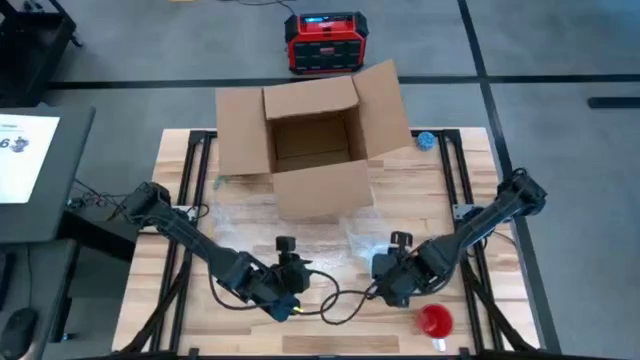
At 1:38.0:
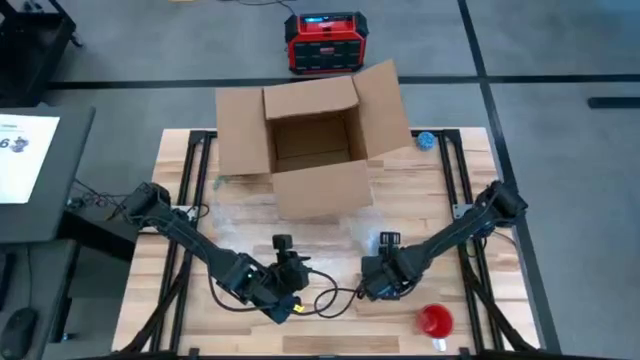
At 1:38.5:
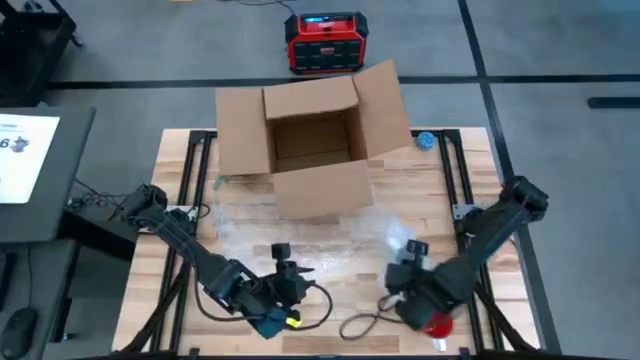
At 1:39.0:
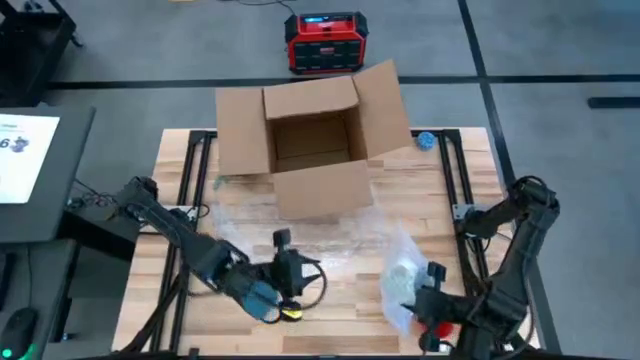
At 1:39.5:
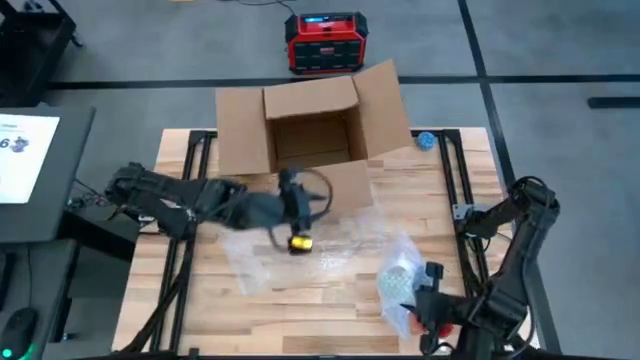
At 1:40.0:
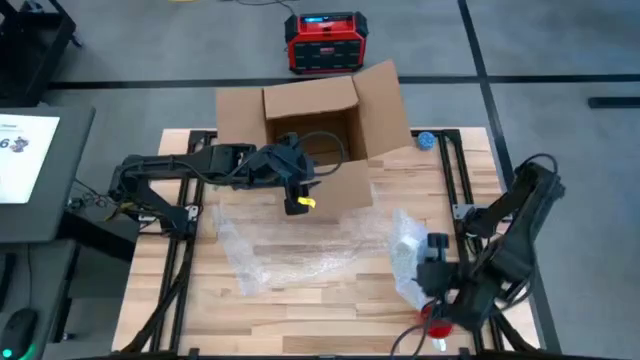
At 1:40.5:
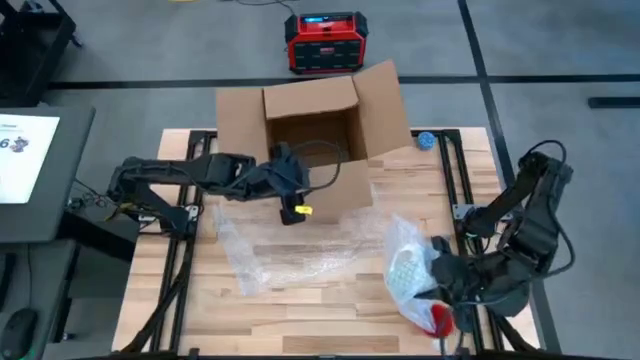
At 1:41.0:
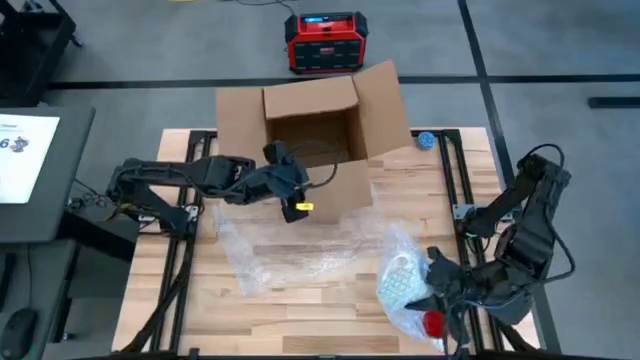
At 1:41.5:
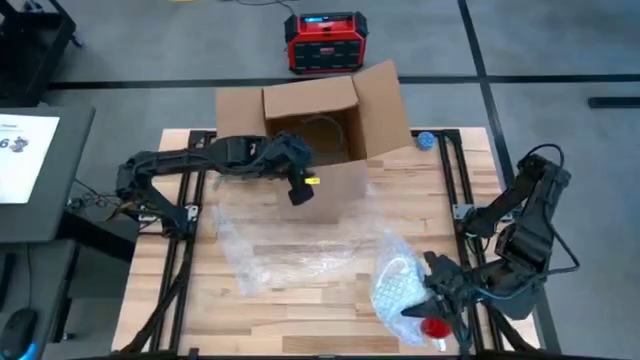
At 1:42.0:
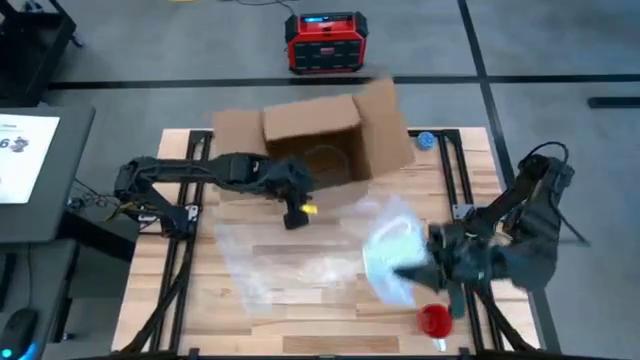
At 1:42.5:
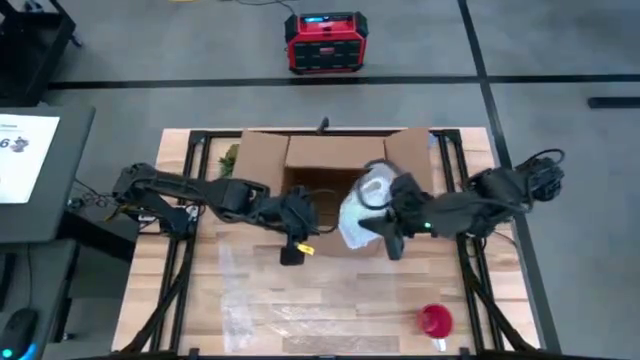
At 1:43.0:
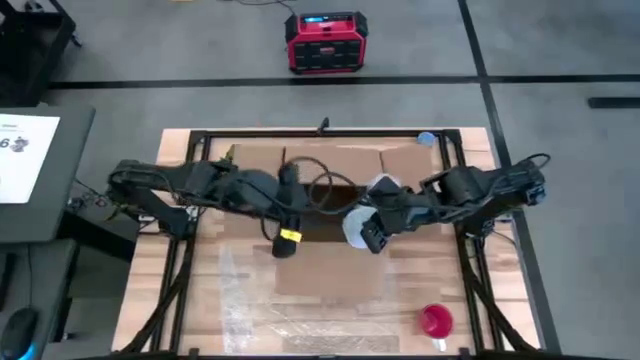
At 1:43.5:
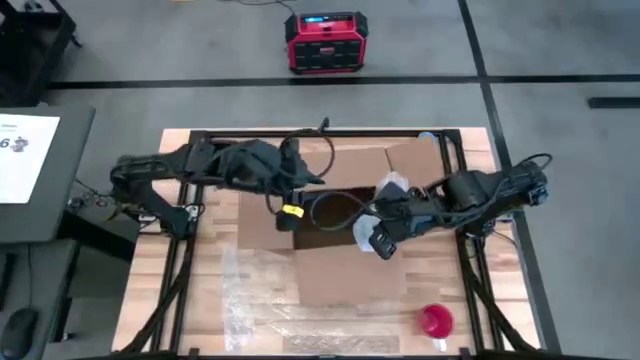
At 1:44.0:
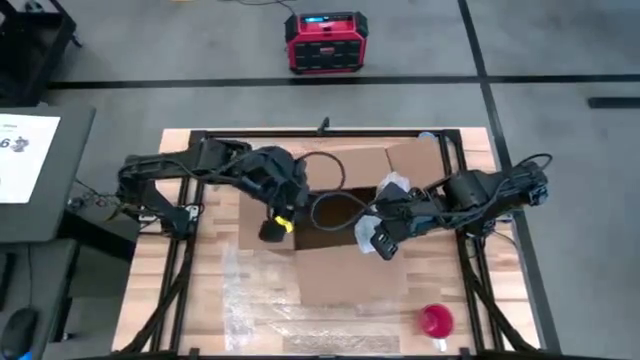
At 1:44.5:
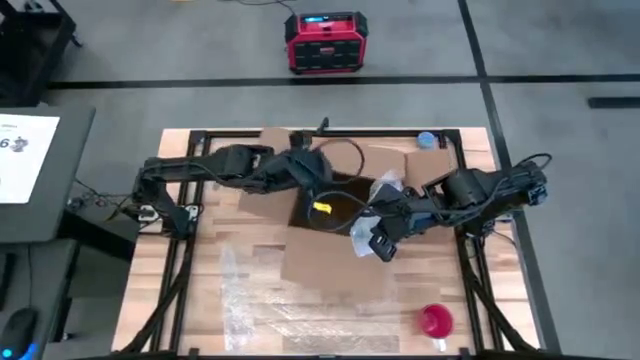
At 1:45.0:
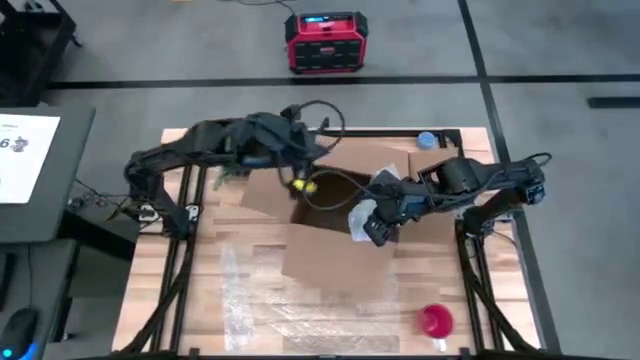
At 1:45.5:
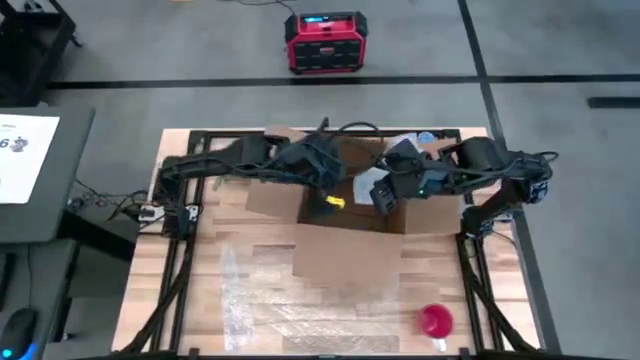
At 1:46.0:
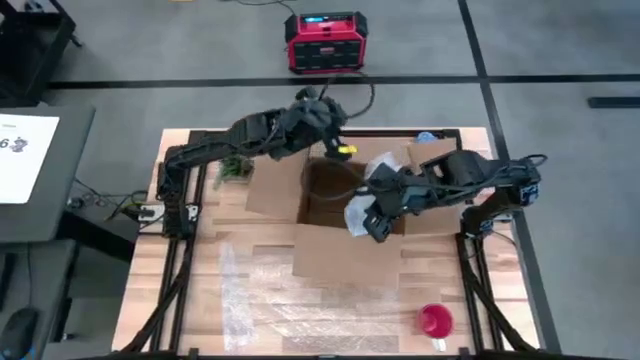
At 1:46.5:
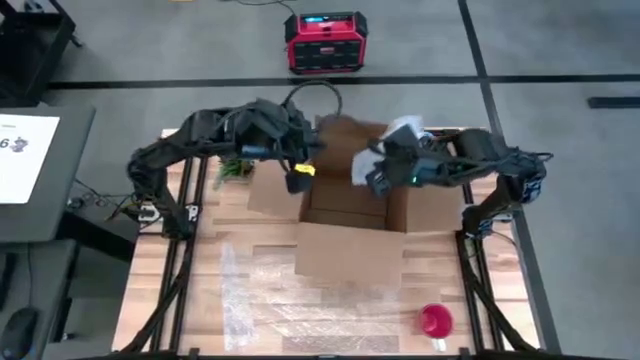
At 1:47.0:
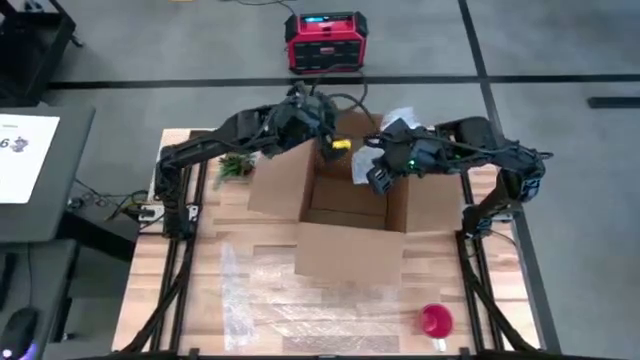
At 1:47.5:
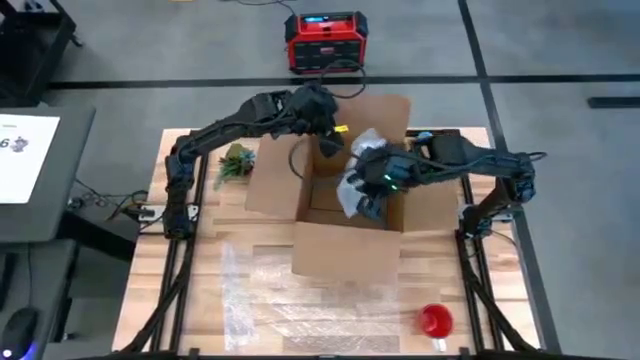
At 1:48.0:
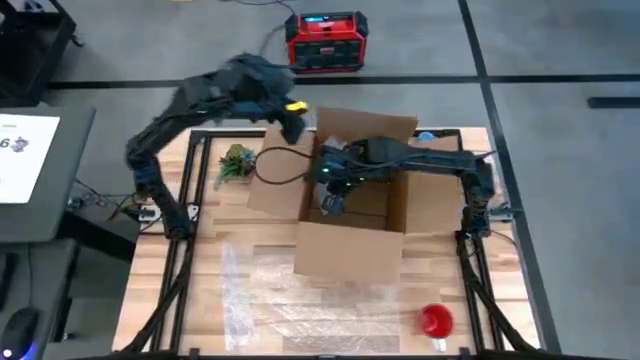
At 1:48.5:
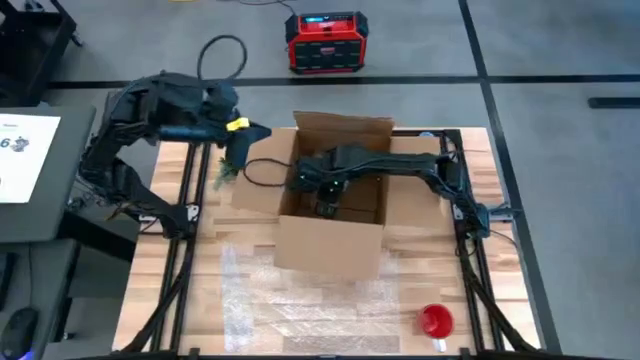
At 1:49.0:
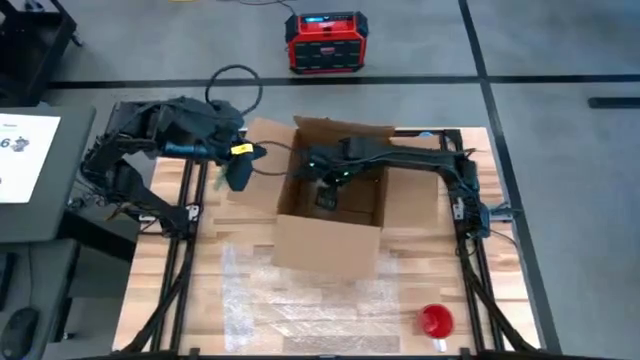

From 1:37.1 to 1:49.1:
Task: wrap mug
Put the green patterned mug into the cardboard box

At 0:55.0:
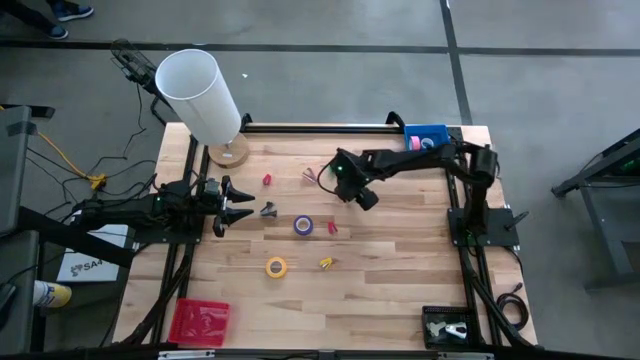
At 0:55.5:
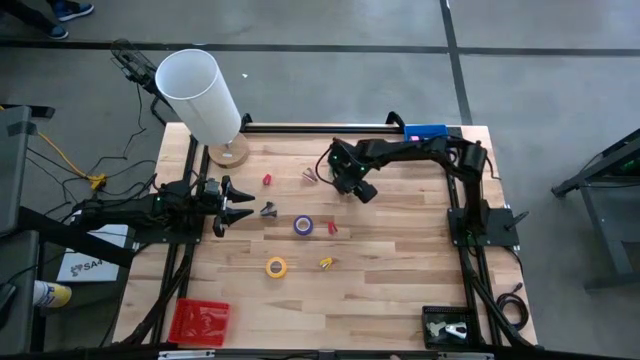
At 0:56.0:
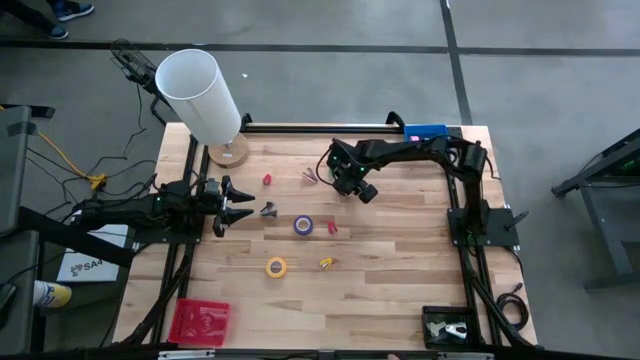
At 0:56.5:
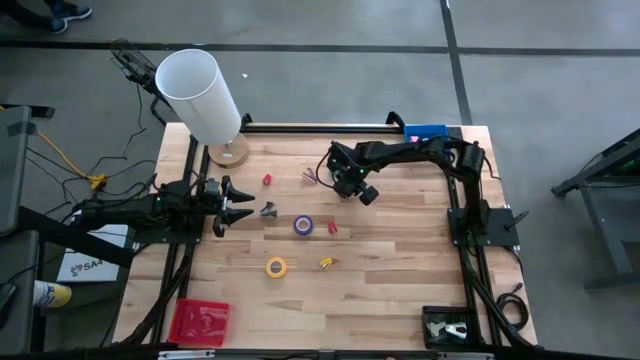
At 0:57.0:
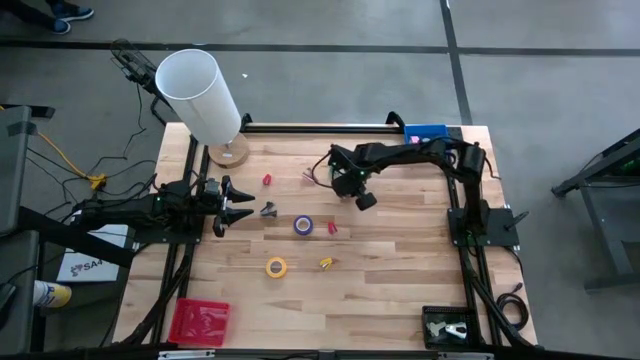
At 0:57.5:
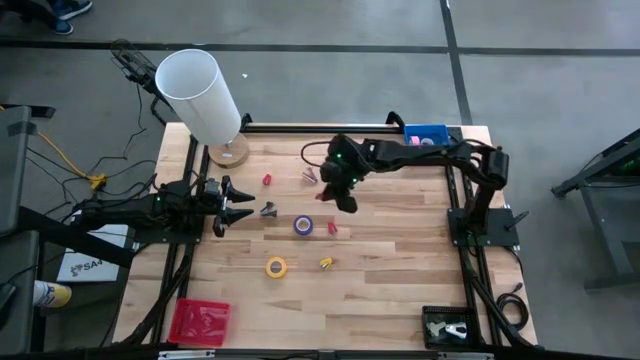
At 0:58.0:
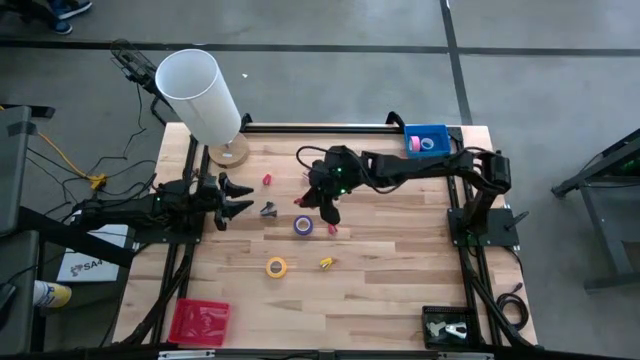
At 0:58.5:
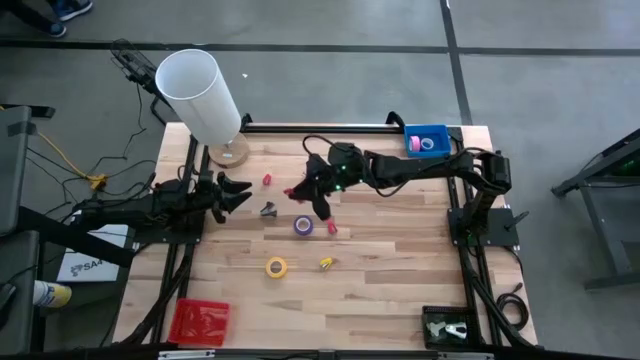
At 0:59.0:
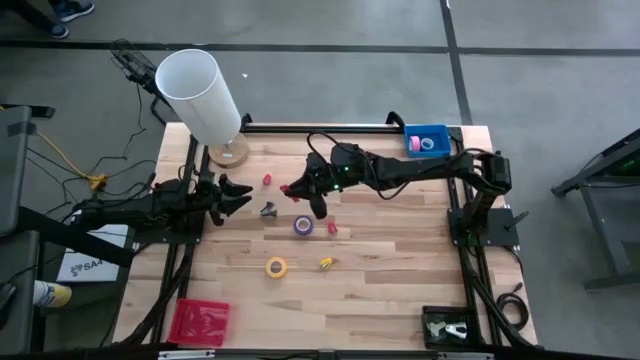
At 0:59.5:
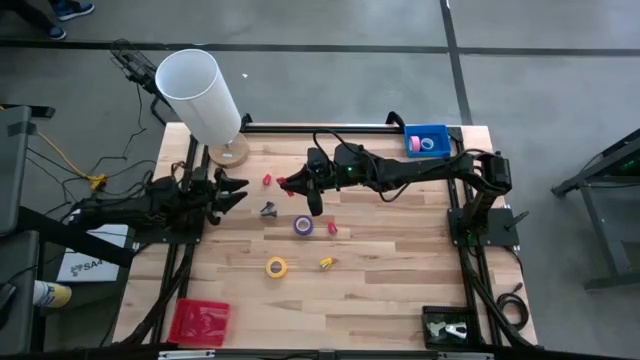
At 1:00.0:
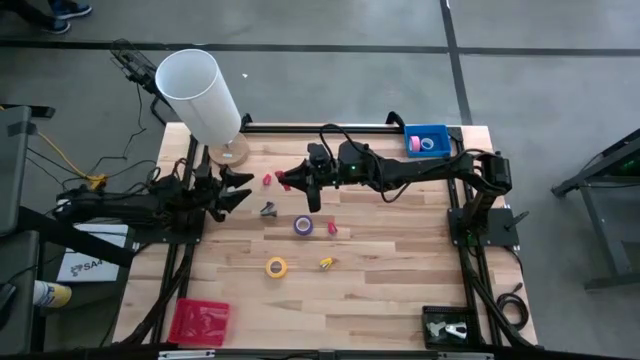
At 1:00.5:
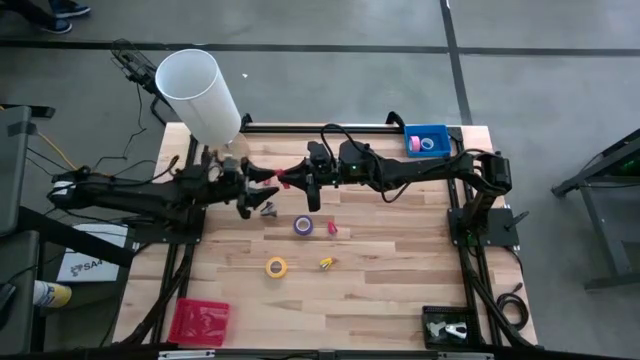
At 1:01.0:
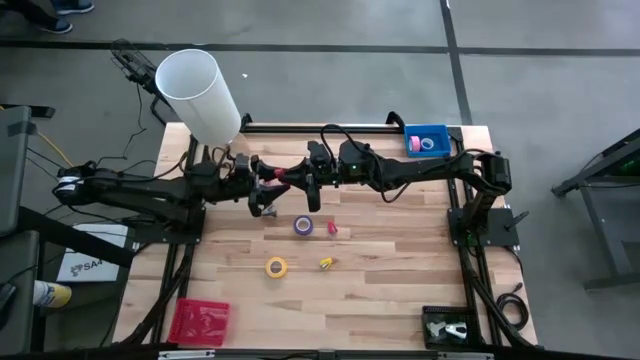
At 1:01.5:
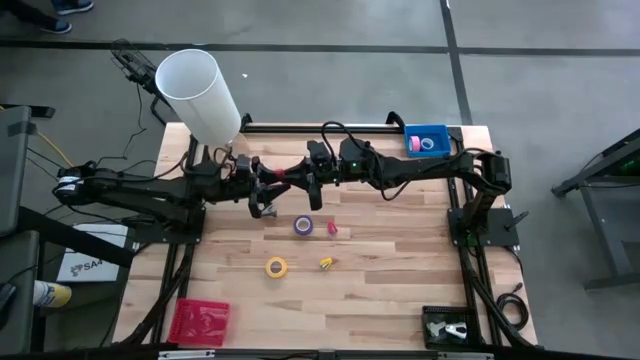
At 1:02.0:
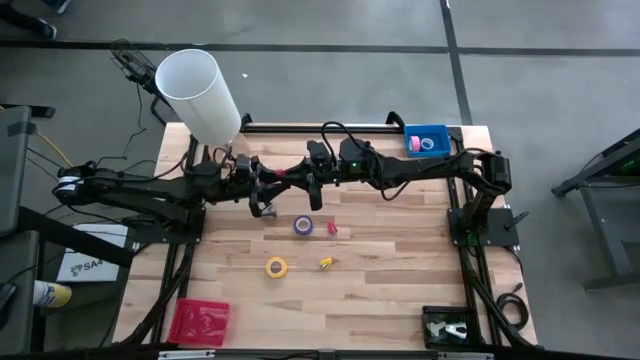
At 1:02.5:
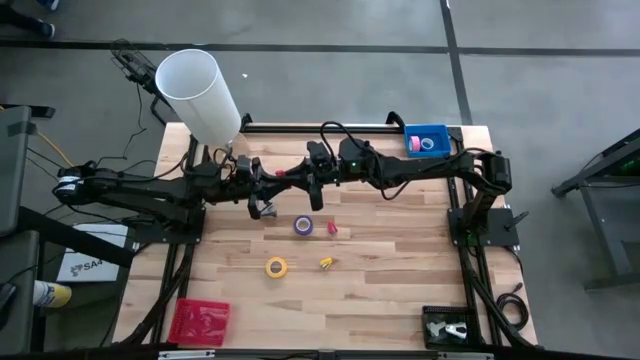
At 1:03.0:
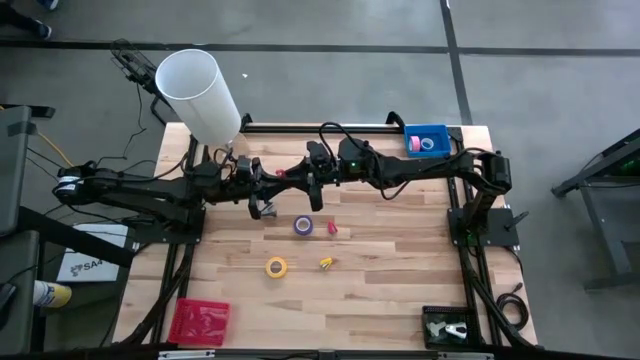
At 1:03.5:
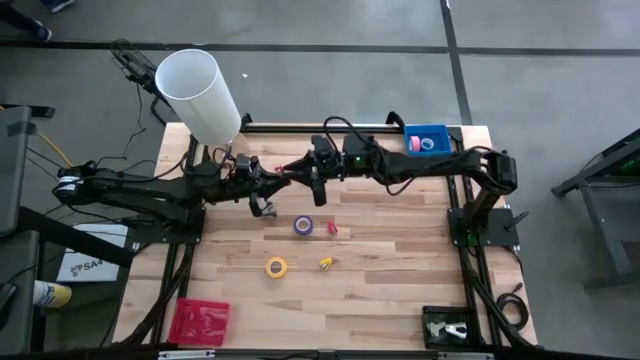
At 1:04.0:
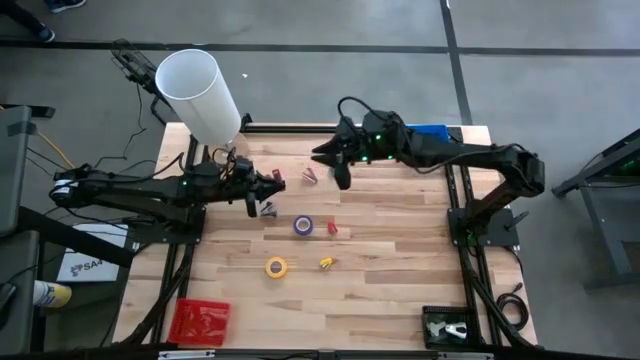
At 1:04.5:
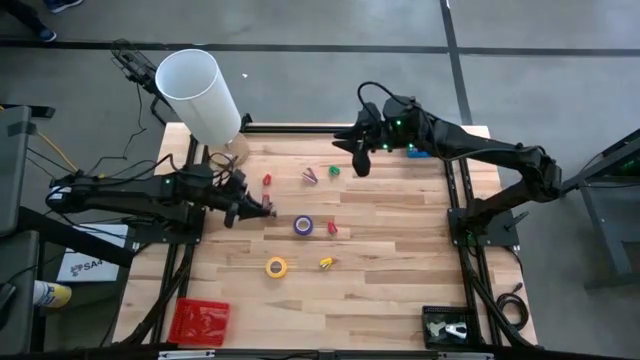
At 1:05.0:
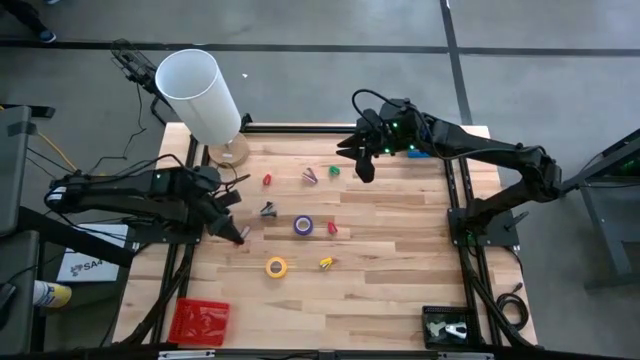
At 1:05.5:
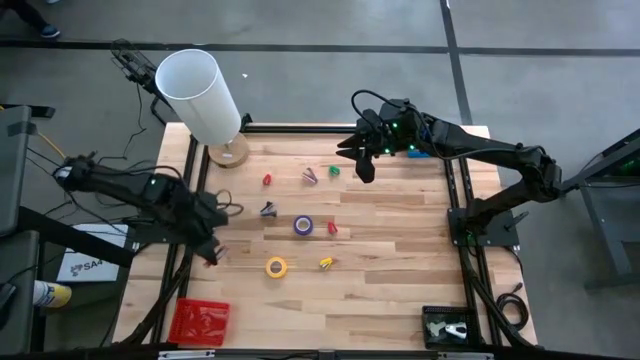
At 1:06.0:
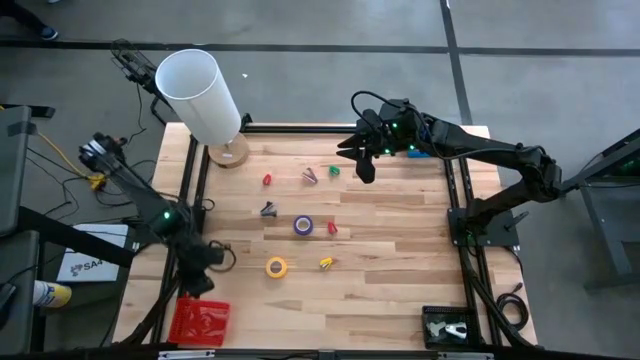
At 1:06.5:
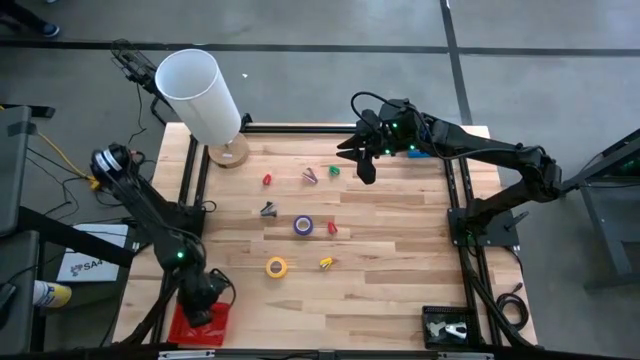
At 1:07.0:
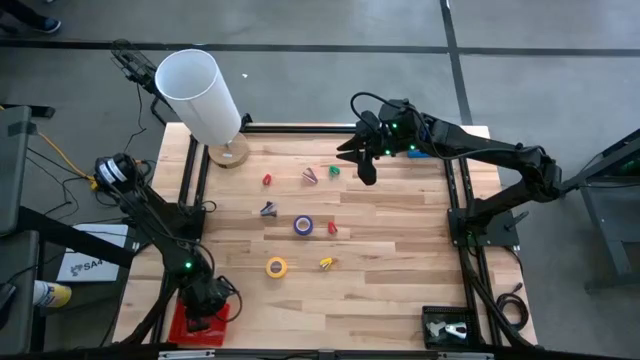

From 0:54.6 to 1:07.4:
Task: Pick and place Stapler, Stapler remover, tape
Put the bottom right red stapler into the red bin
